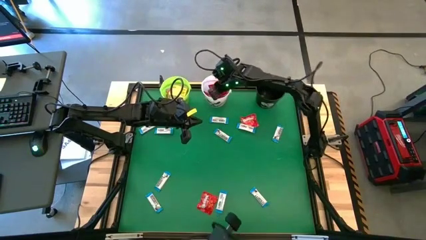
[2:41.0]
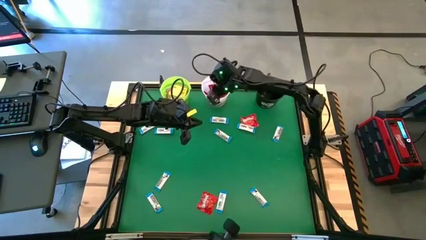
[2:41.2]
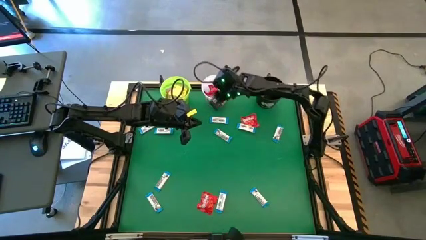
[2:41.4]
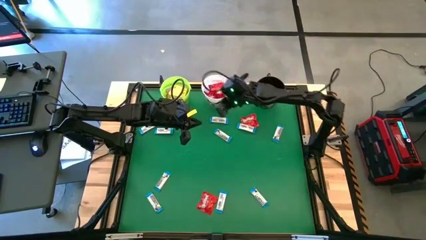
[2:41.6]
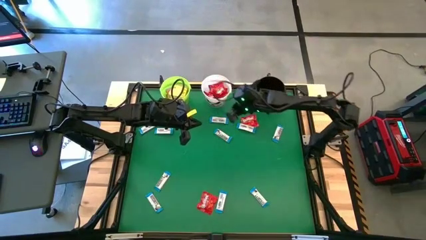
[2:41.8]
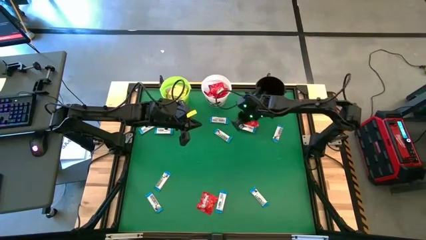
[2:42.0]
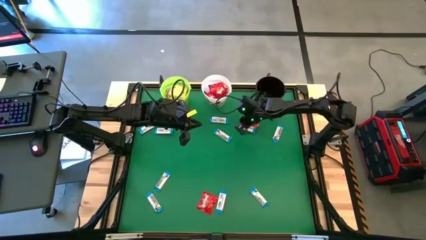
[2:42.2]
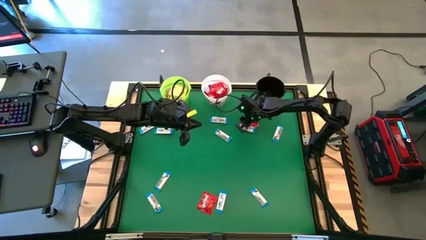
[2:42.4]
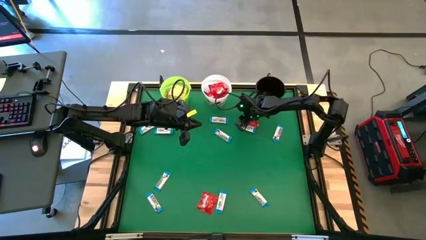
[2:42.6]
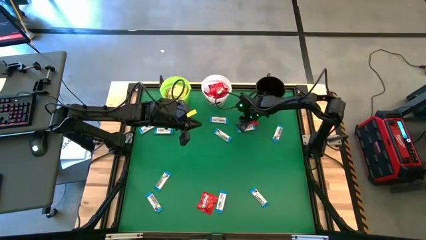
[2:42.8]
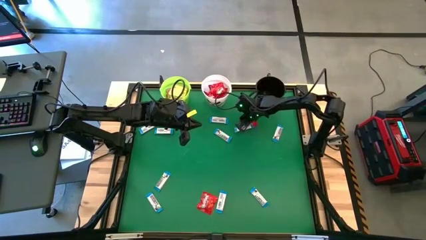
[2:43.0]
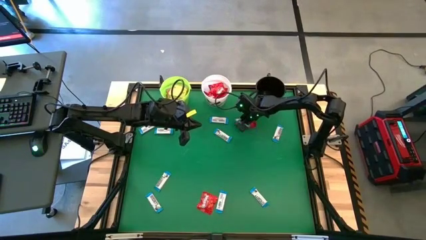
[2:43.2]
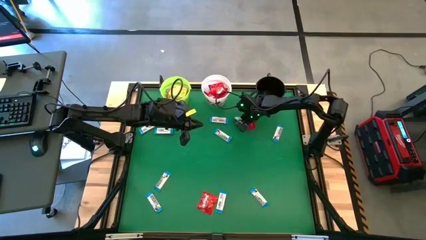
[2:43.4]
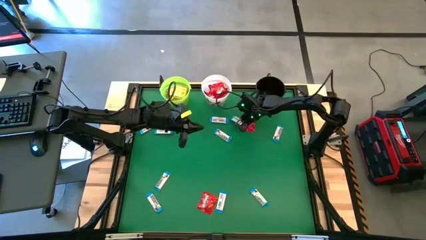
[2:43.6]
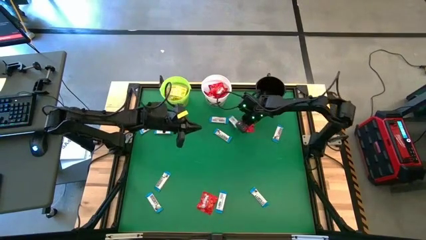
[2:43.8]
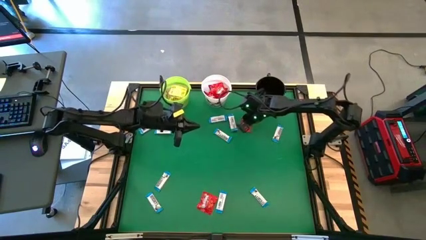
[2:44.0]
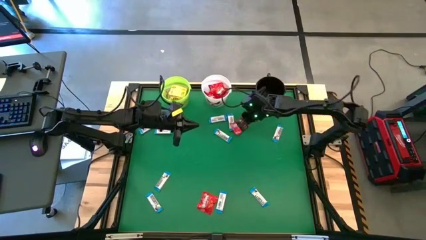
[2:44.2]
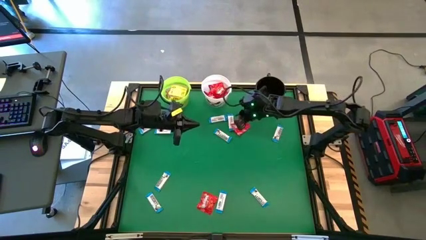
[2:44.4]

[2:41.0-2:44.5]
Task: Sort candy by brand, put in halloween buckets
Put the red candy into the white bucket

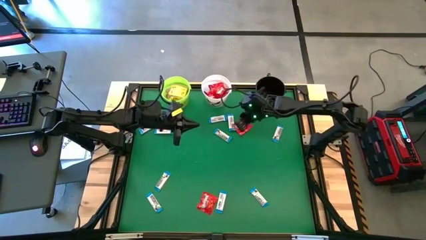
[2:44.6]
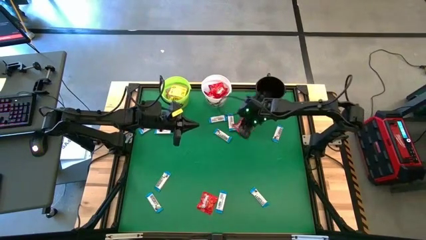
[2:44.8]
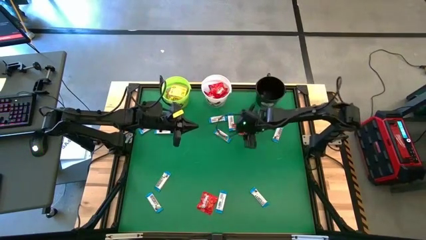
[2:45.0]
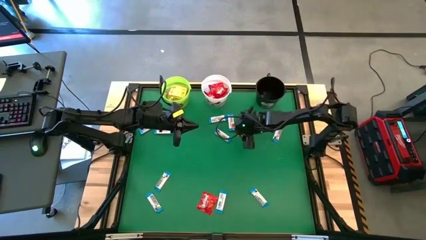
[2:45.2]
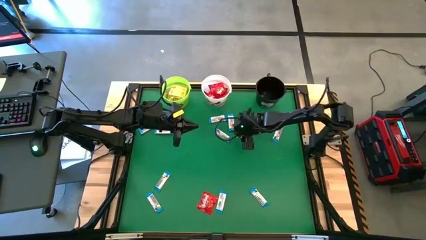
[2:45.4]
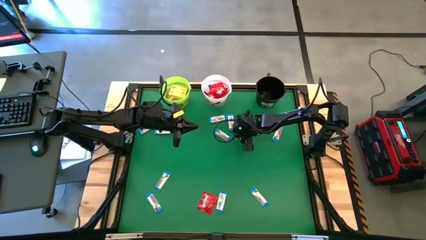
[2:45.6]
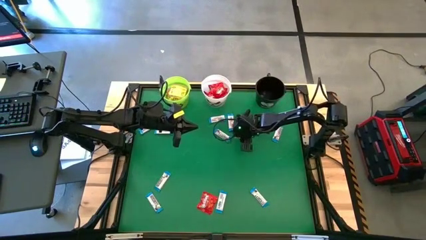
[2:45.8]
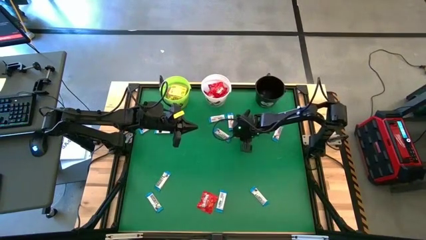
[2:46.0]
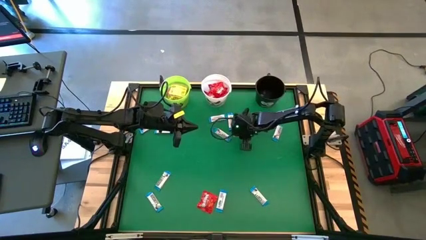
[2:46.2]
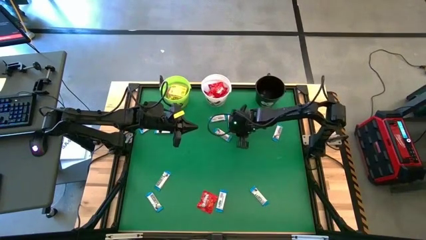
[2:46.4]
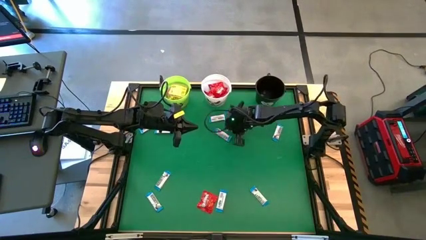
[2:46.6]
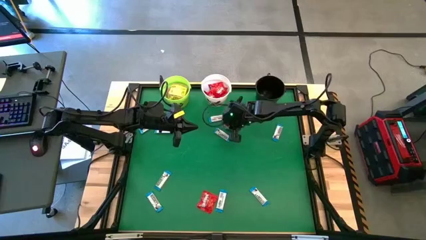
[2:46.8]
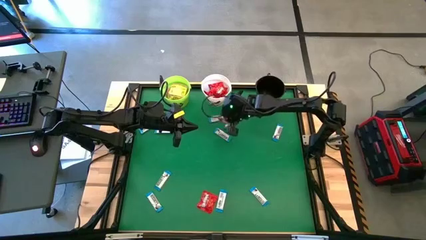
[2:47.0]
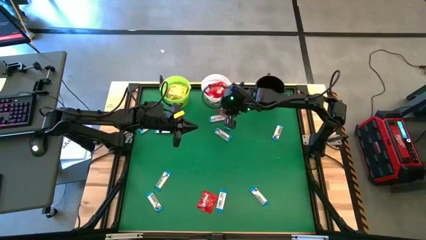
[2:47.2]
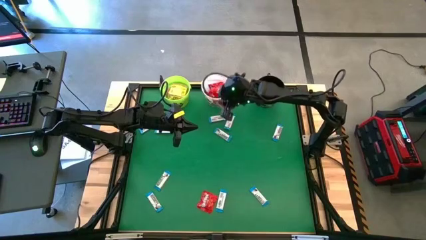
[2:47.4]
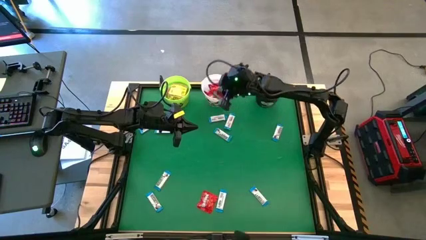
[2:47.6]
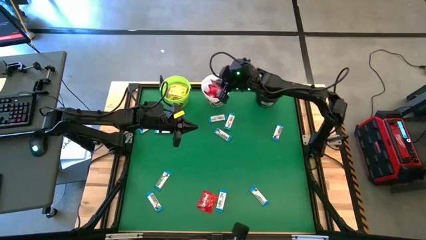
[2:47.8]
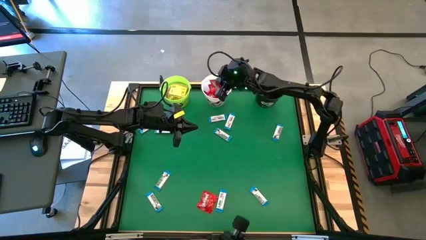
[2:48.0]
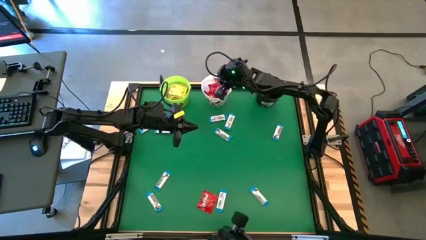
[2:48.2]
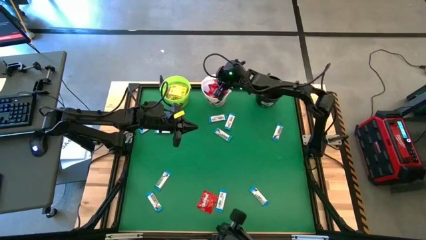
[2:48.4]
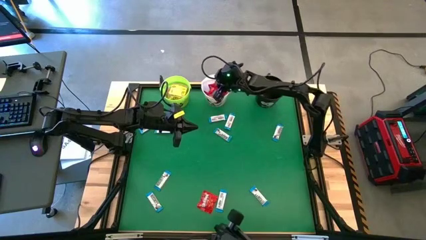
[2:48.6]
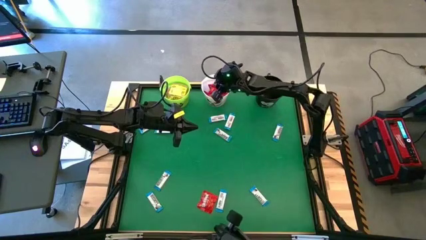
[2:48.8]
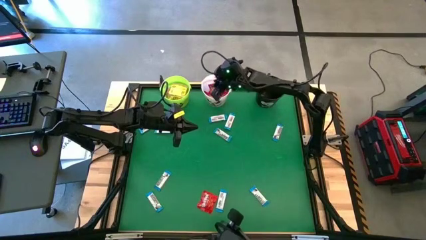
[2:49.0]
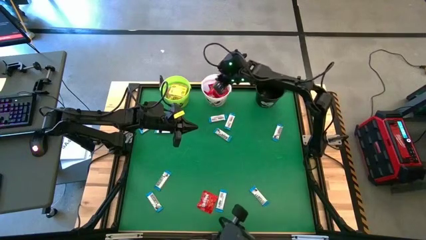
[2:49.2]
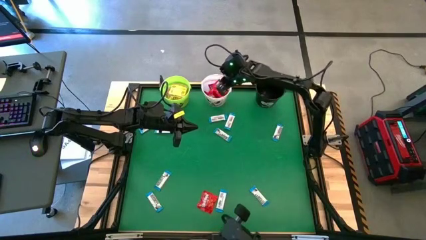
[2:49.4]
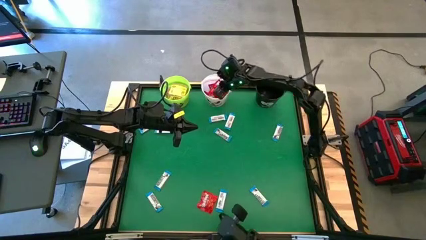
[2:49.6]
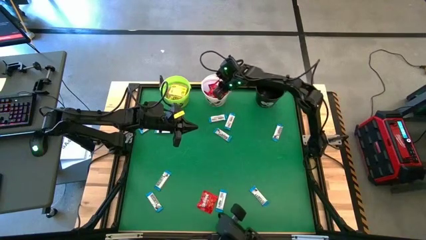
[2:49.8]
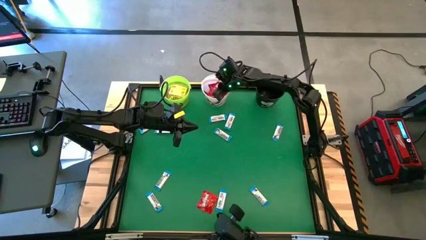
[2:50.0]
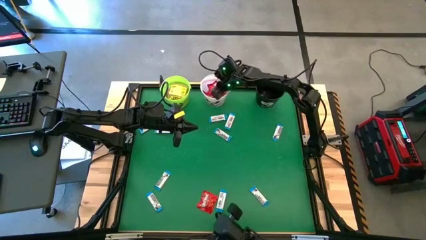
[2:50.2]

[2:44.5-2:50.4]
Put the red candy into the white bucket

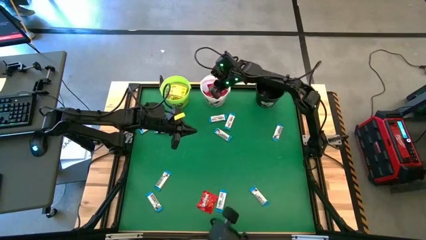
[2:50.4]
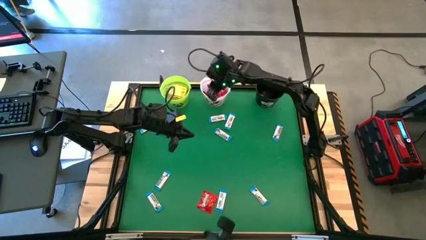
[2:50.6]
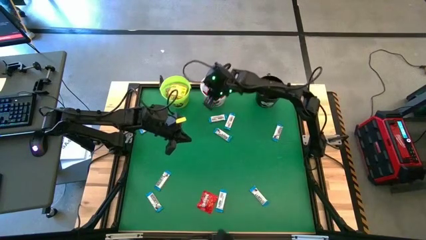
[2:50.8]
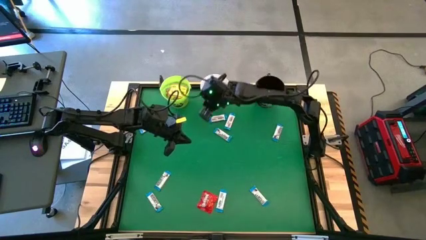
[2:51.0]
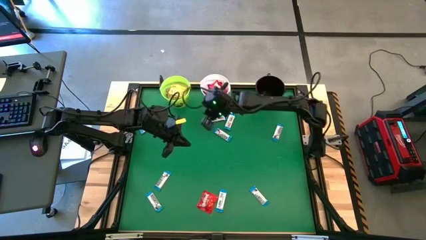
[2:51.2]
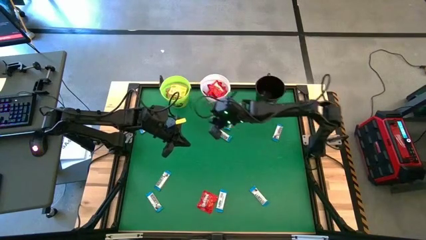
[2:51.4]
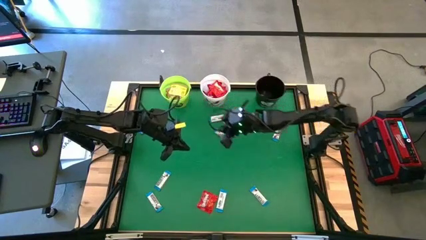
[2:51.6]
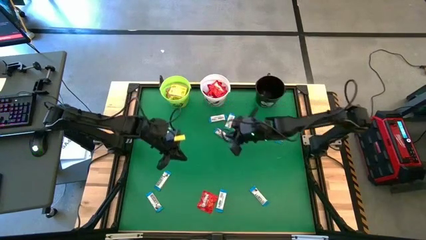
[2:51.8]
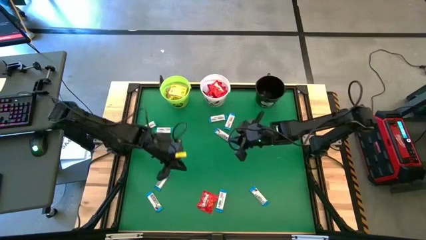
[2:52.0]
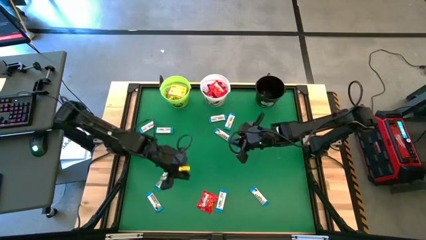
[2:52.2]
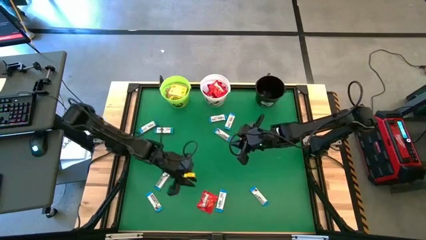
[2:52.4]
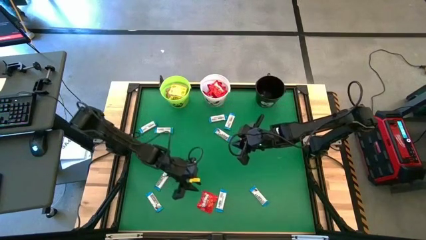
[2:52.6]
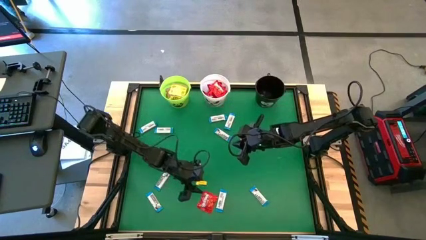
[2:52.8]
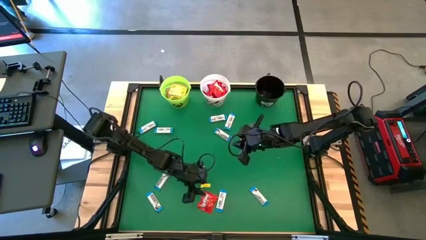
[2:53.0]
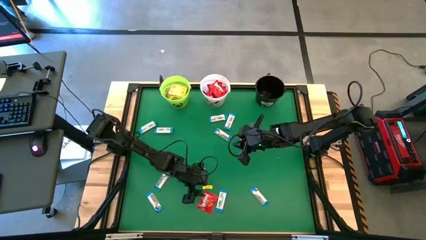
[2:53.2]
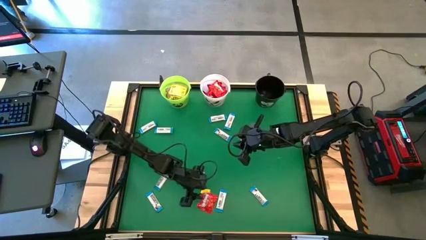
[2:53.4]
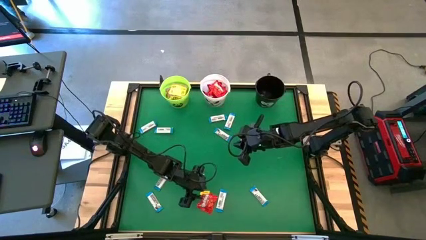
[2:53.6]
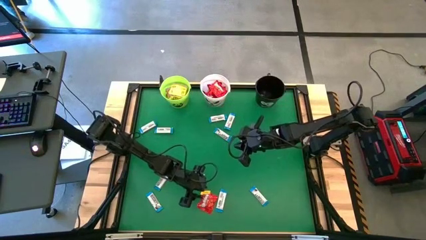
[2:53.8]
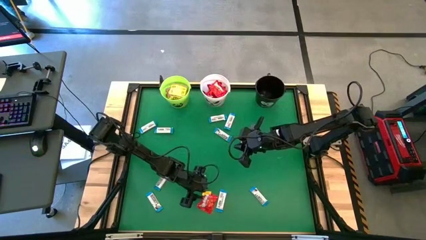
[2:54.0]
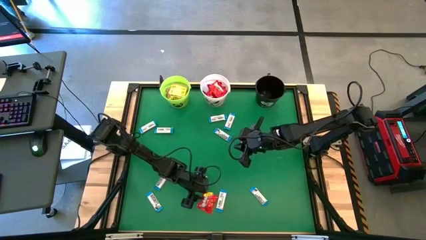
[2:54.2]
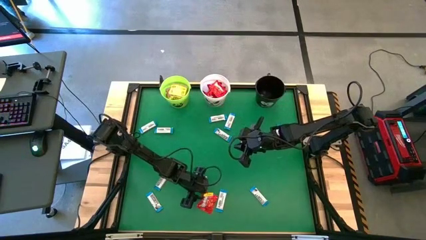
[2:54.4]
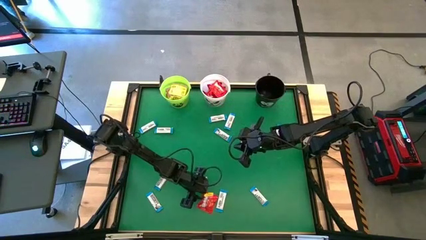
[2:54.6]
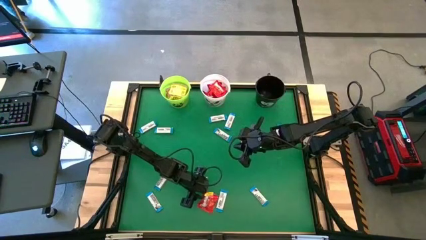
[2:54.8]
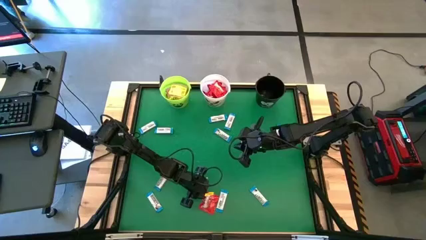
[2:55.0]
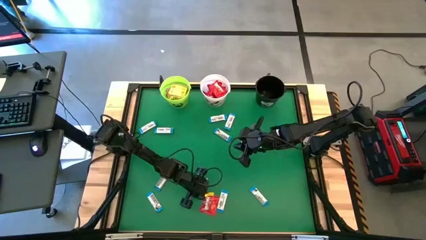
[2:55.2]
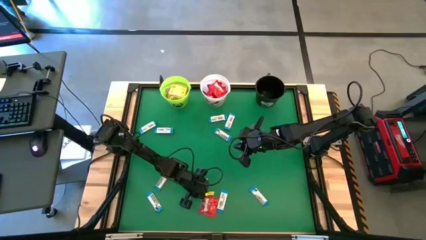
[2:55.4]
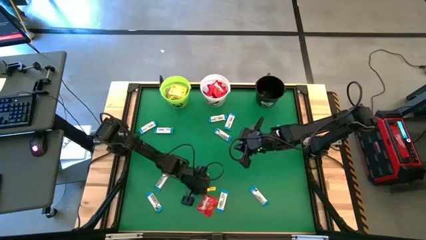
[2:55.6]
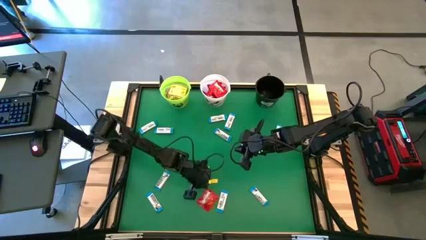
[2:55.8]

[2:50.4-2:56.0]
Put the red candy into the white bucket
